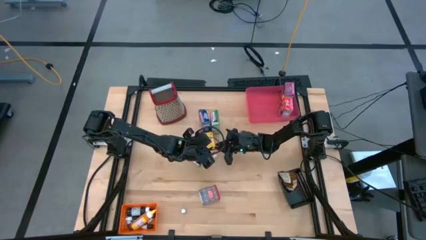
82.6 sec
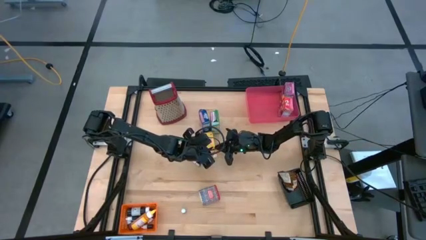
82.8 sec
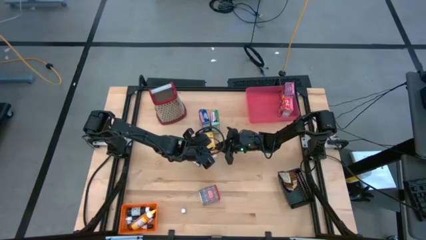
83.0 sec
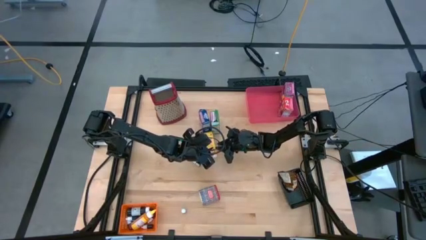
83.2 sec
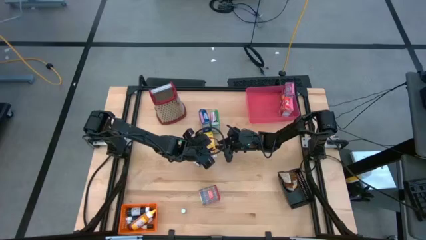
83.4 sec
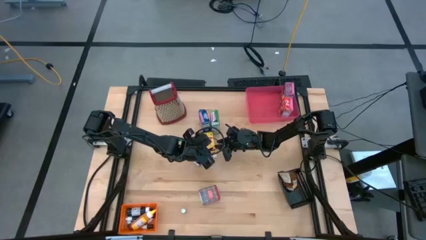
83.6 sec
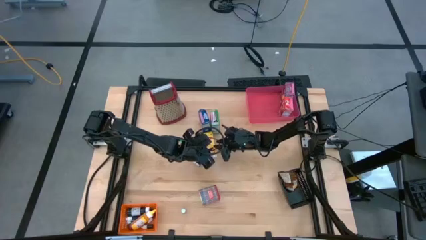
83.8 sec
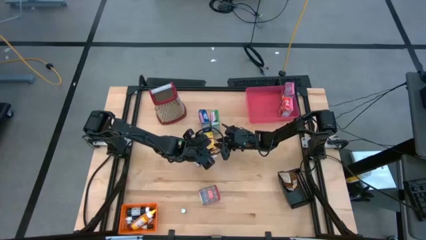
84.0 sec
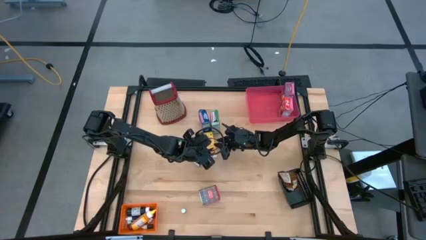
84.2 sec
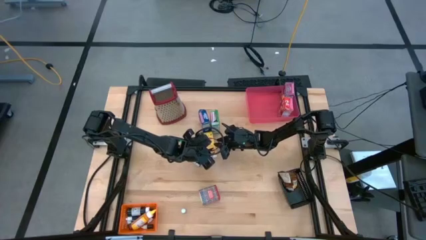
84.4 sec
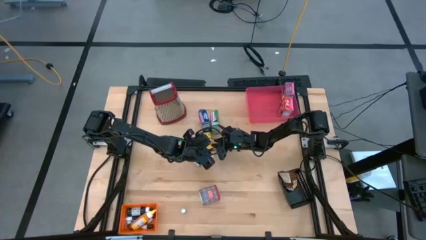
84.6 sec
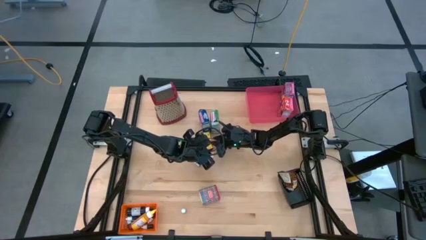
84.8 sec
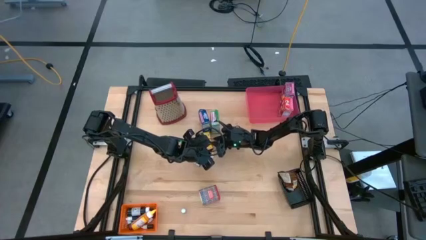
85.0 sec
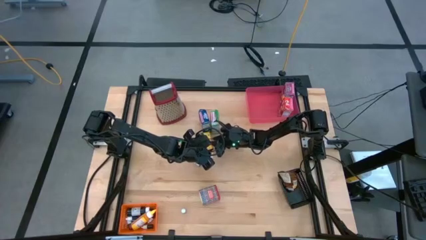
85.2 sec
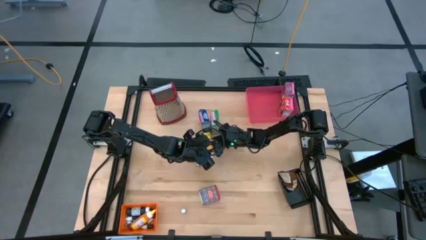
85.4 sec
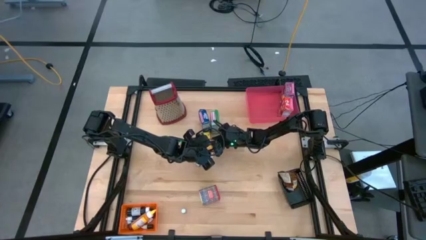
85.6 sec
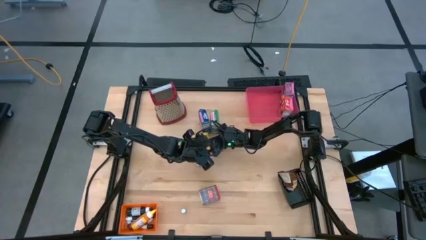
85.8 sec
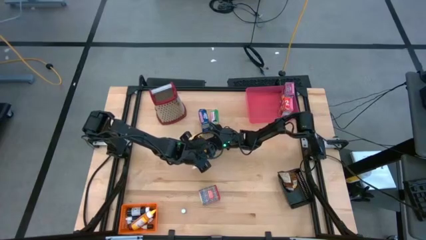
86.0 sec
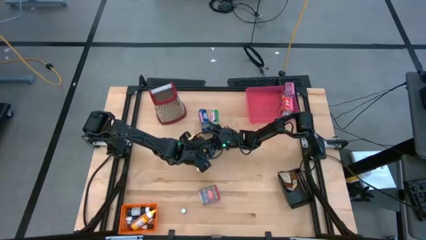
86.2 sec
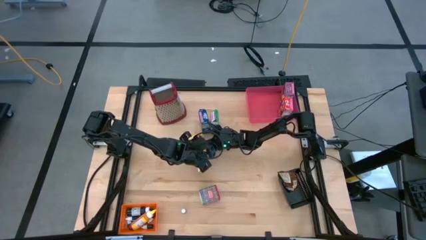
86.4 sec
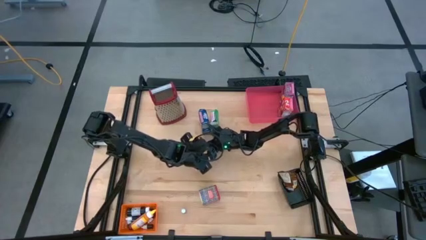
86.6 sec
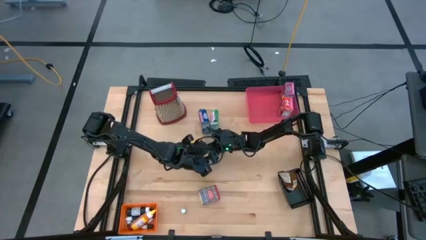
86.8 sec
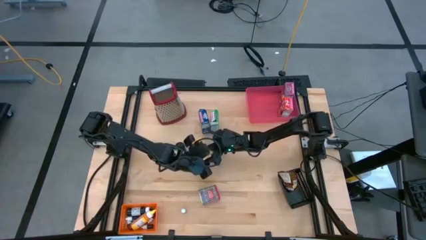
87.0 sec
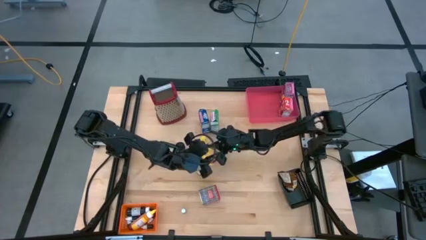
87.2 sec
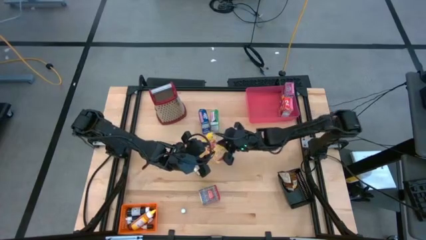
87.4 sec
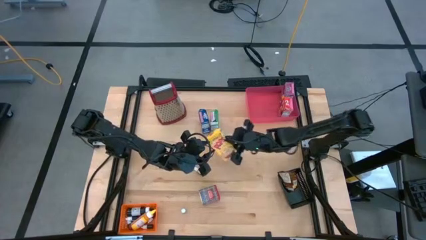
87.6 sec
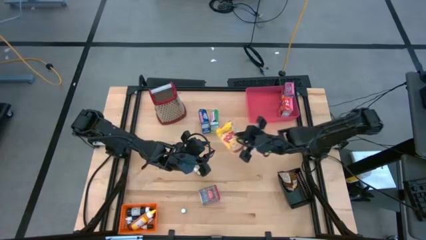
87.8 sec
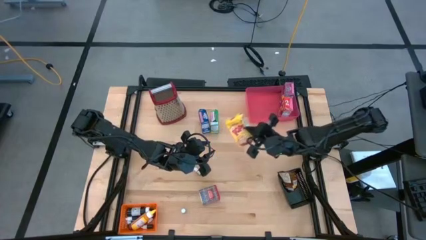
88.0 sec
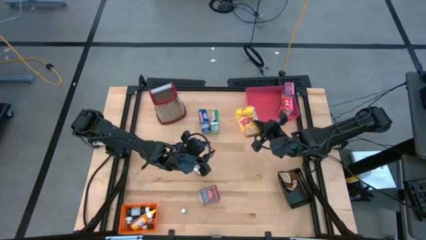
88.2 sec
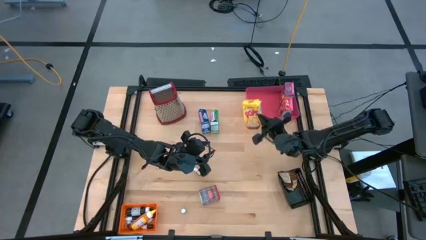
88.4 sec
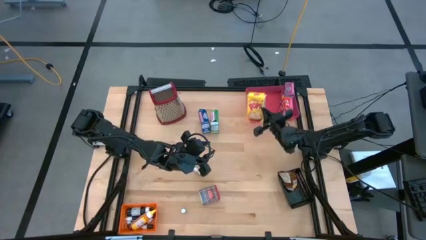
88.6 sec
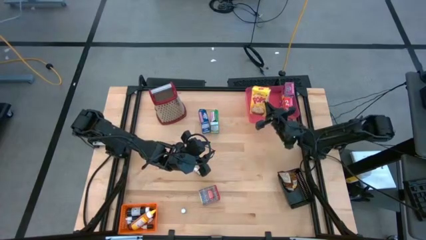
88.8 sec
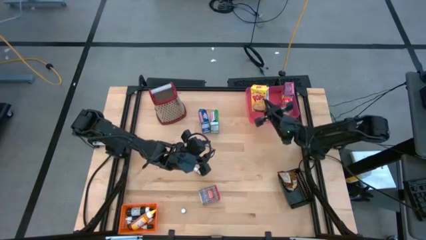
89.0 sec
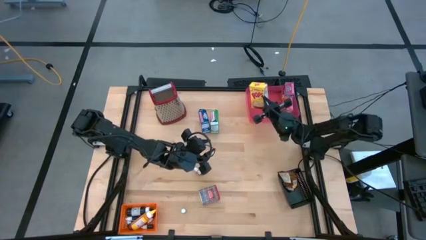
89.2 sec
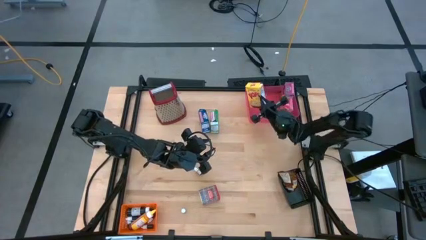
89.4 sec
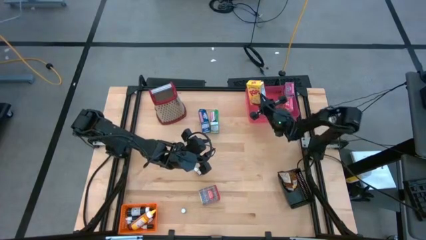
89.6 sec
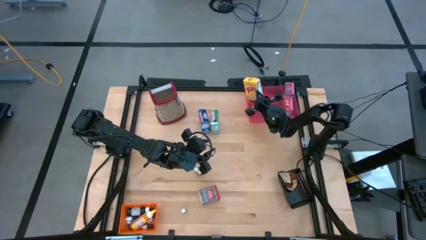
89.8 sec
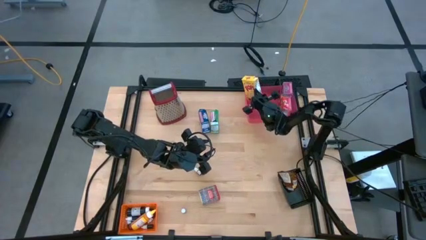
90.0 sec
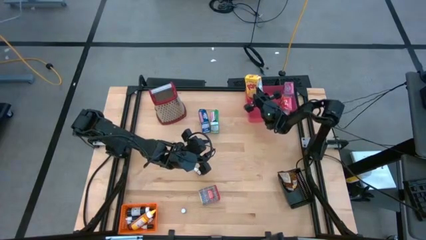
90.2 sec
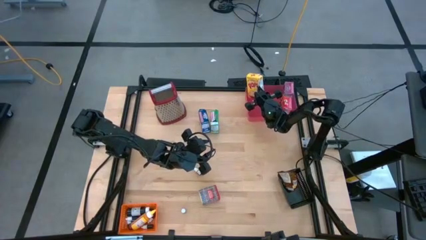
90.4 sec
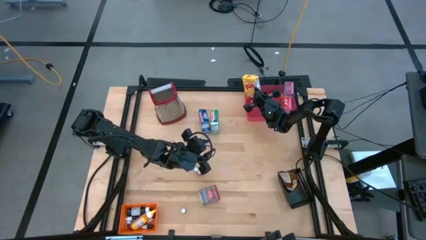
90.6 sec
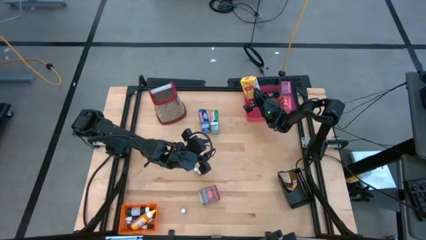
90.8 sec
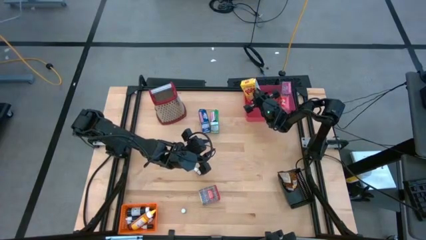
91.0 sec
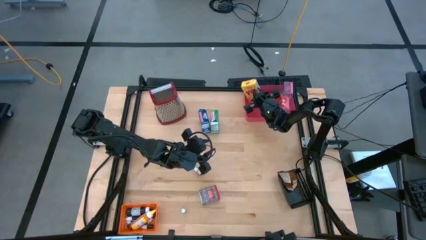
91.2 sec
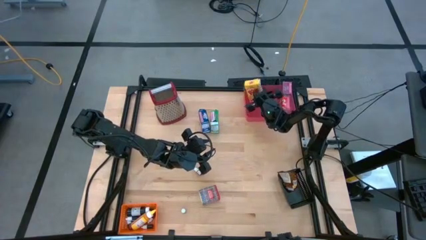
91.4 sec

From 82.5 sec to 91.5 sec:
Task: Pick & Place Kitchen Items
Put the yellow cereal box into the pink bin

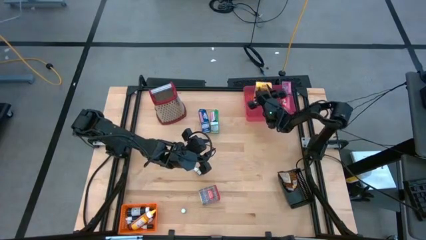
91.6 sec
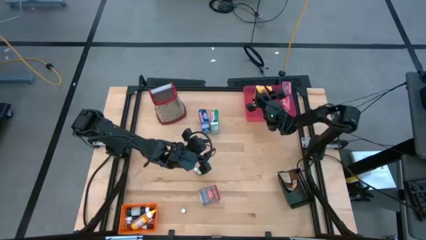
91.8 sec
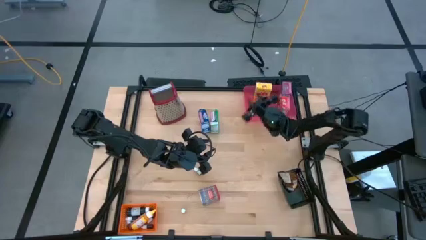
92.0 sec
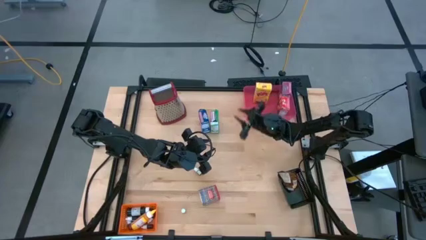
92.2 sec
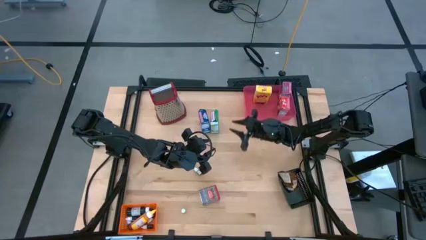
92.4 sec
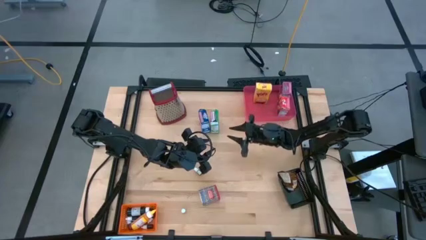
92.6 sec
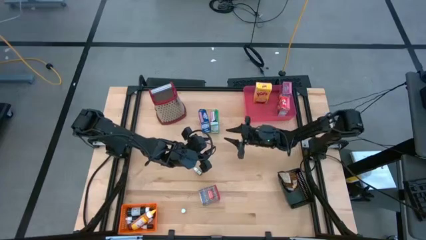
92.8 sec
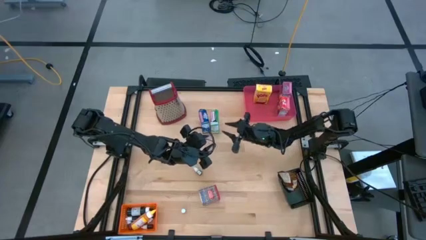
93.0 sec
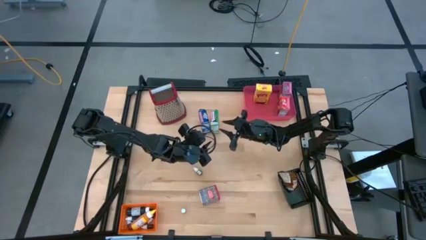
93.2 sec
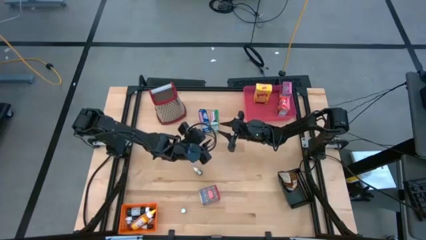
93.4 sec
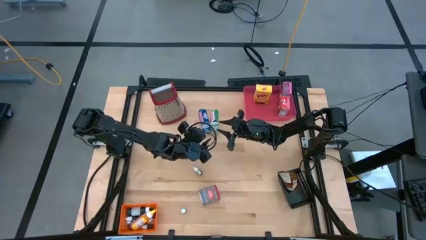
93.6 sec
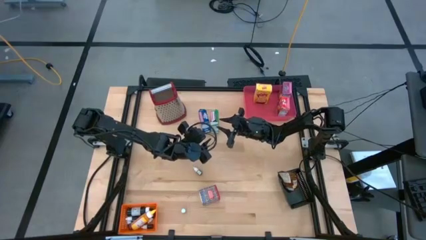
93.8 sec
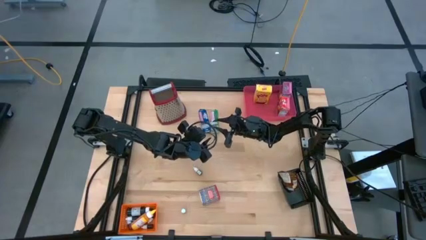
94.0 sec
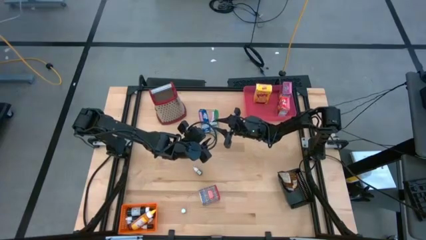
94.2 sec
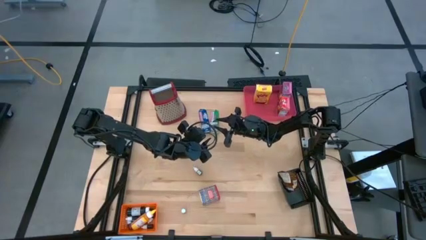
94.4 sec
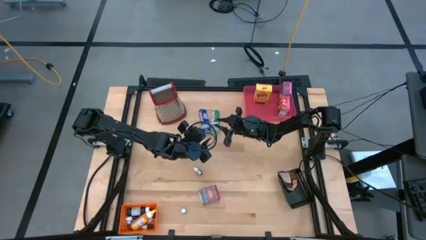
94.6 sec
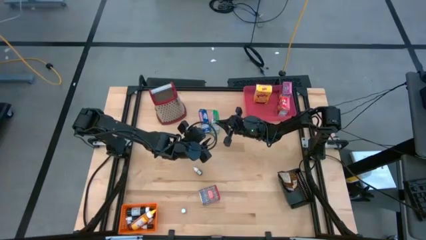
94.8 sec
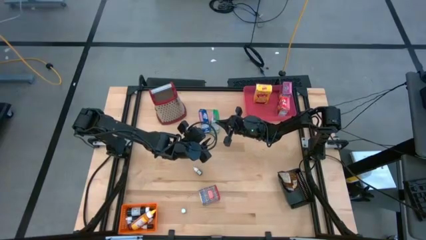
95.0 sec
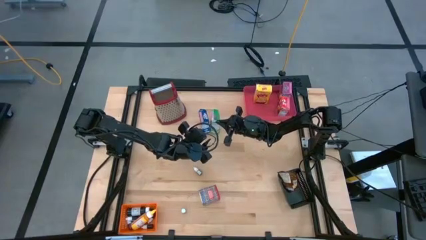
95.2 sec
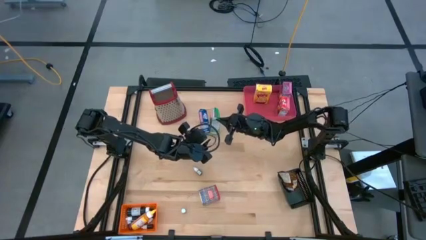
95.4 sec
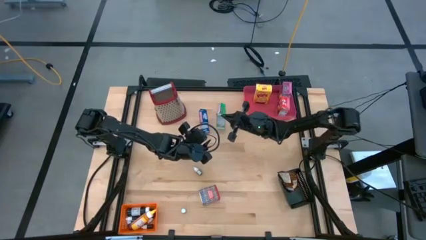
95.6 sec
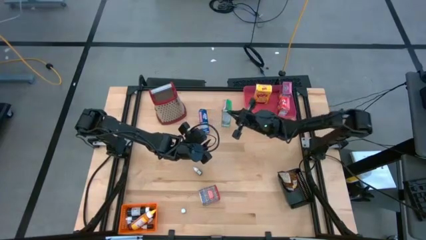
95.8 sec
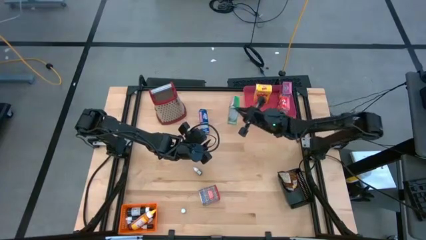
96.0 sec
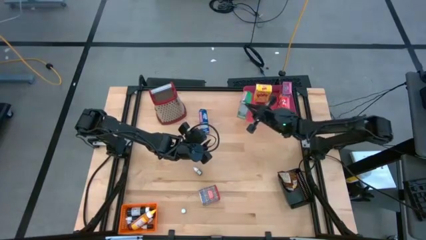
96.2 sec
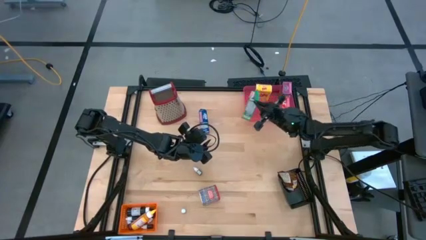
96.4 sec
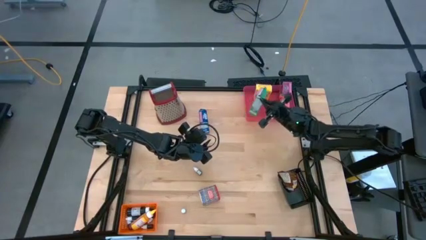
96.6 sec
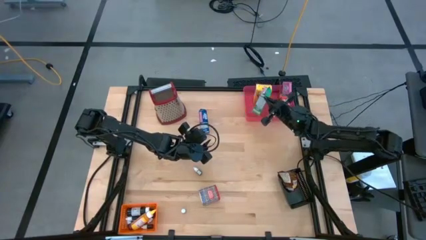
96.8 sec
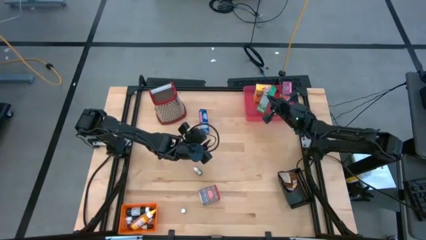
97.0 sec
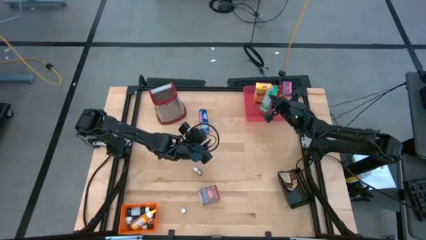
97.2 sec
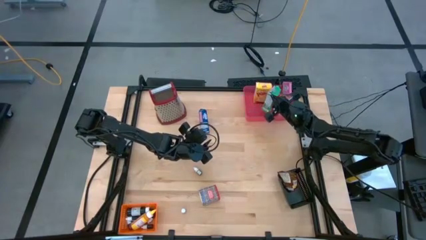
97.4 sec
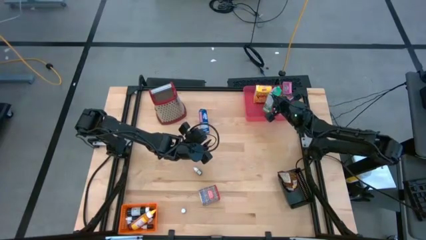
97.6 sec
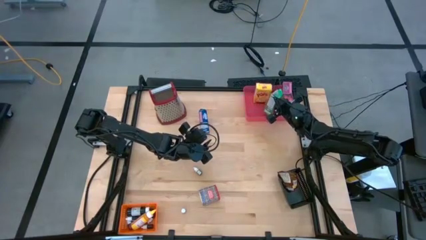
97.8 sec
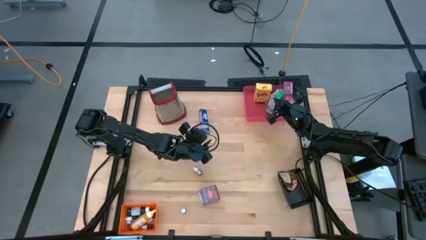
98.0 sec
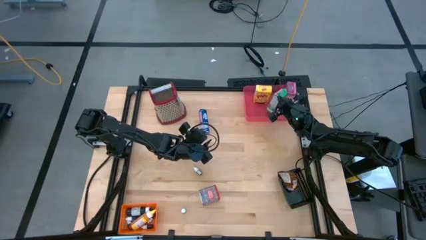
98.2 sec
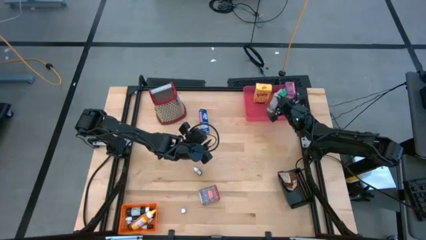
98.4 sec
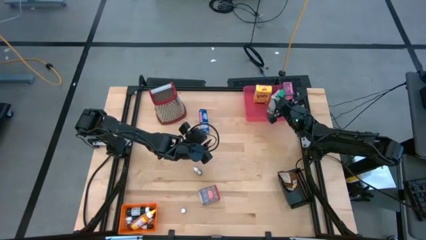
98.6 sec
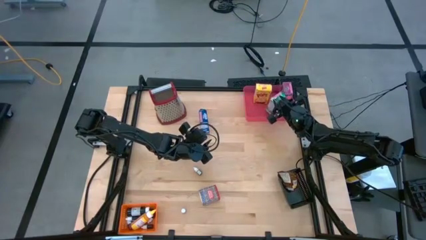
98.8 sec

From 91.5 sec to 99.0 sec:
Put the green cereal box into the pink bin
